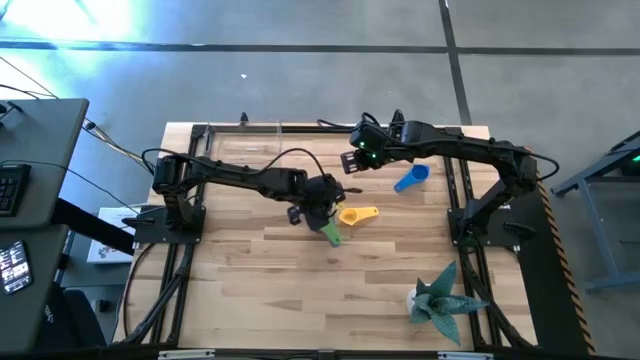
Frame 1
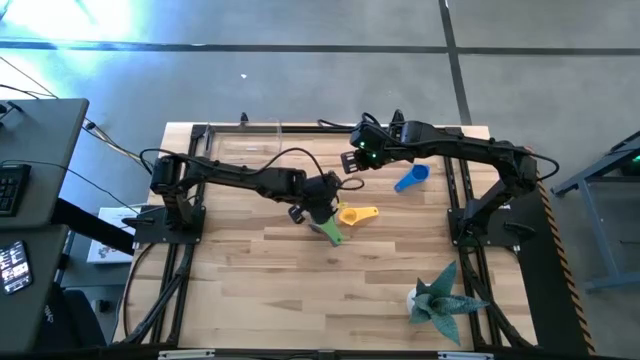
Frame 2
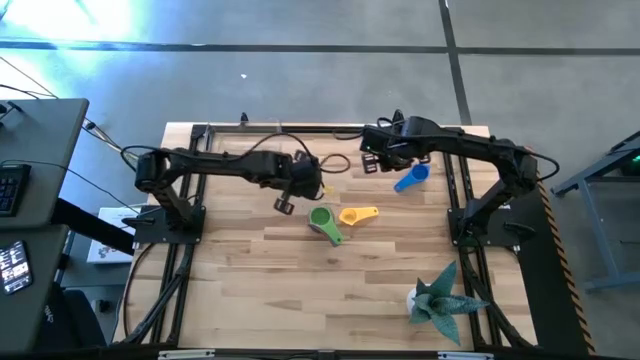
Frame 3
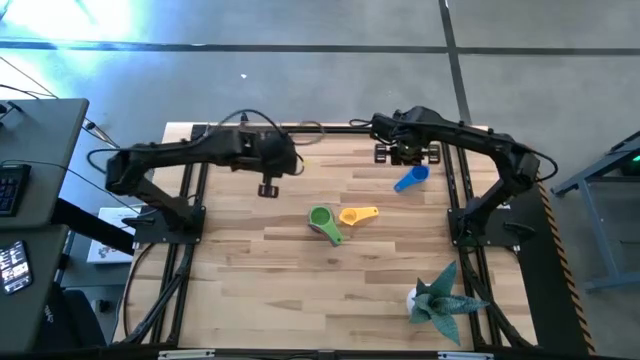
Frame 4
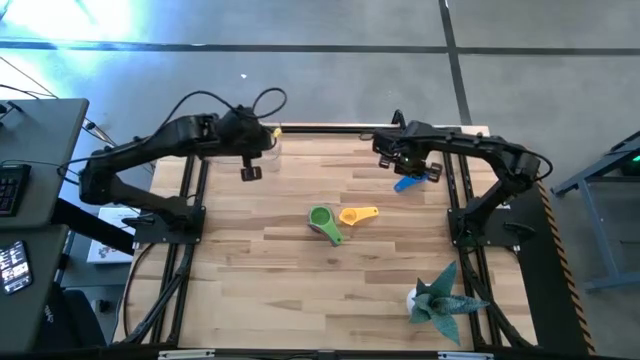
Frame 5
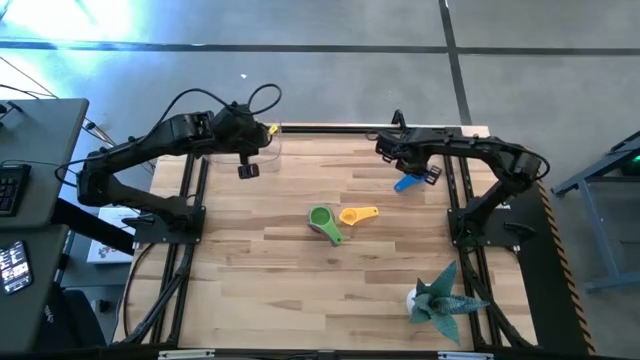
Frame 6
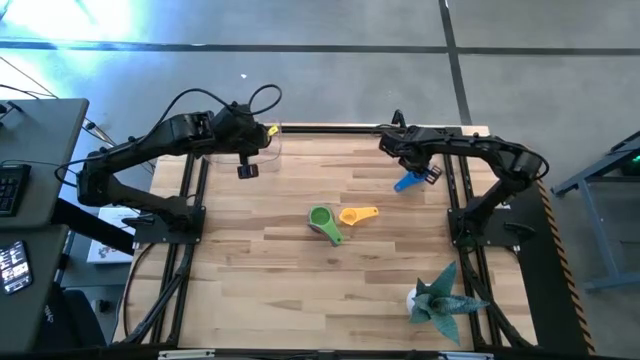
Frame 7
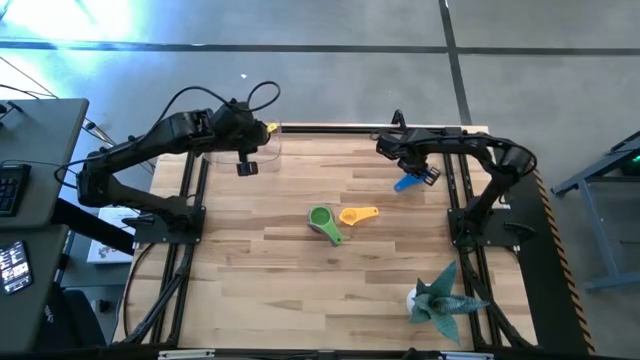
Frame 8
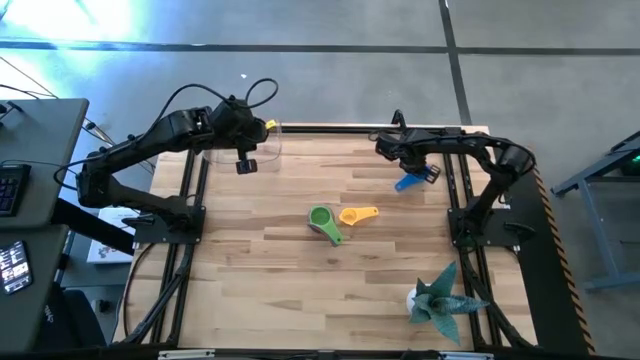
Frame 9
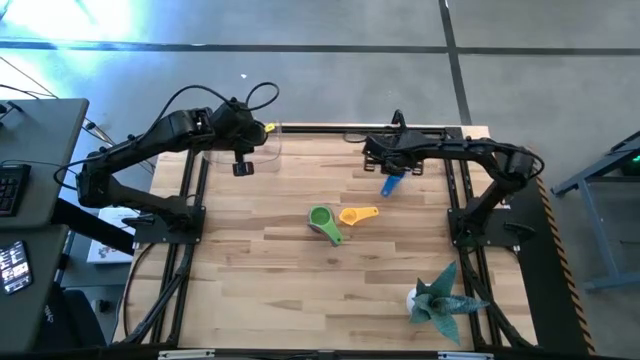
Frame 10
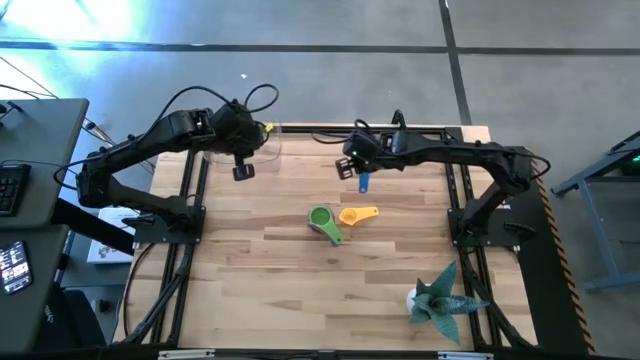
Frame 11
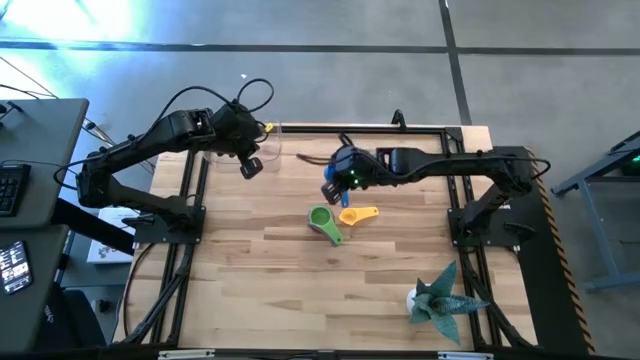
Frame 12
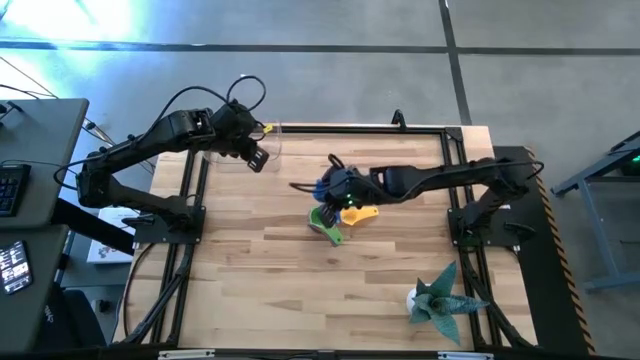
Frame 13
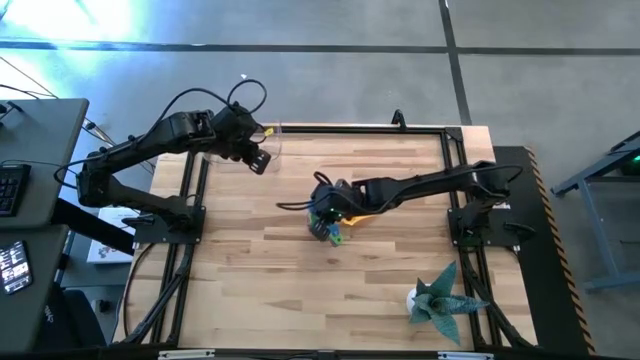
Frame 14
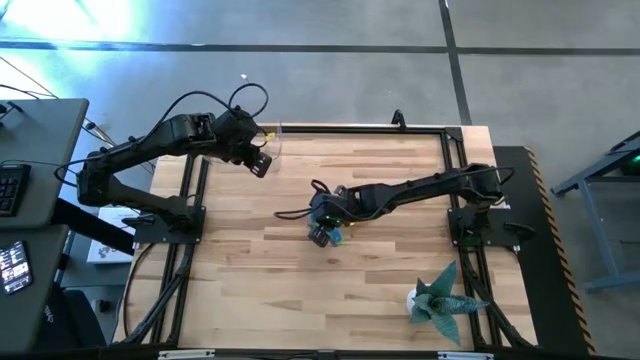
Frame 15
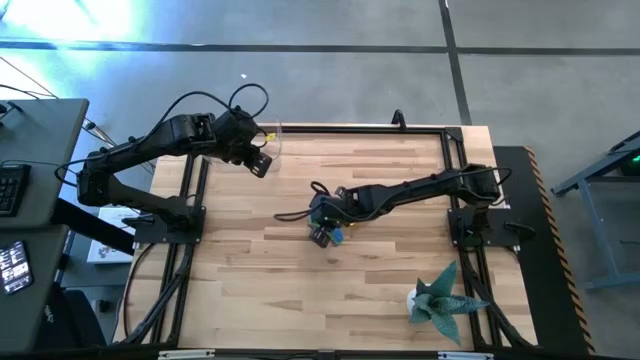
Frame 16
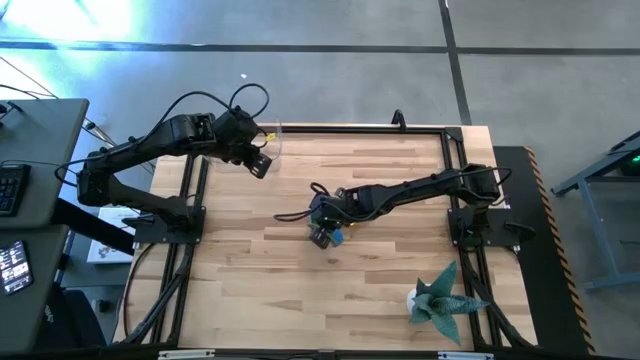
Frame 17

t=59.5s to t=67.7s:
Task: Nest measuring cups in basket
Stack the blue measuring cup on top of the green measuring cup

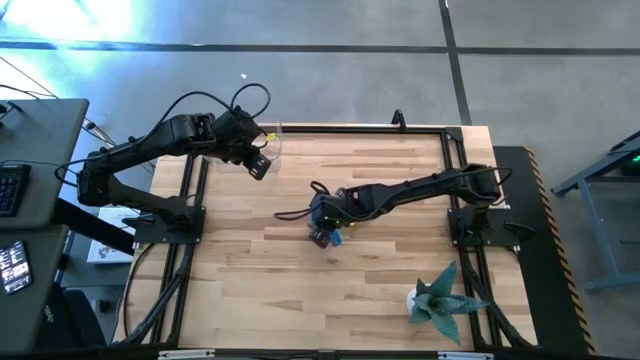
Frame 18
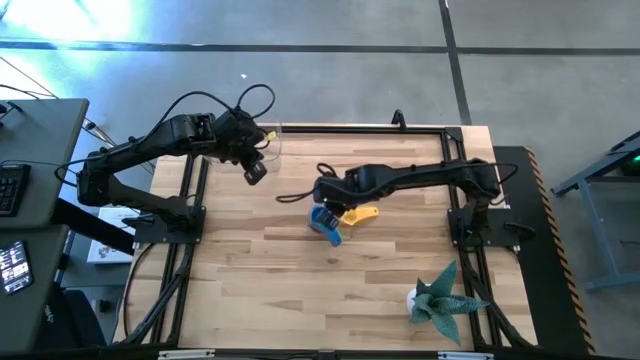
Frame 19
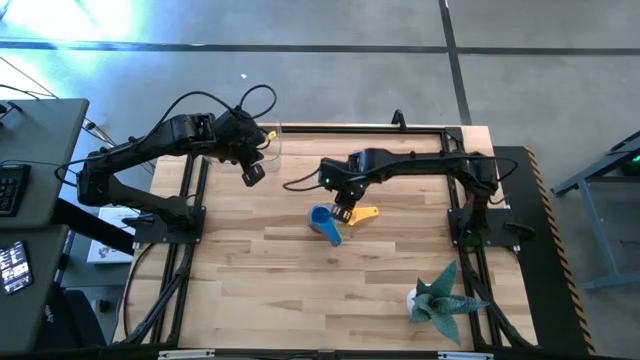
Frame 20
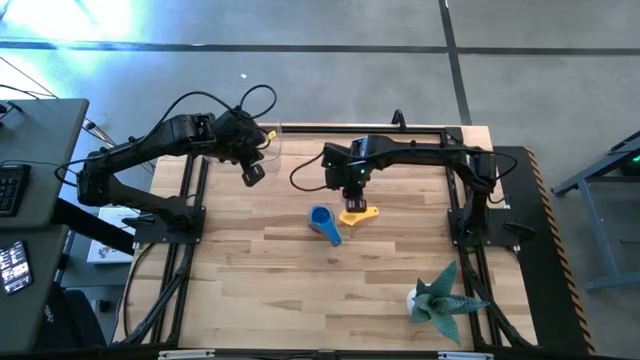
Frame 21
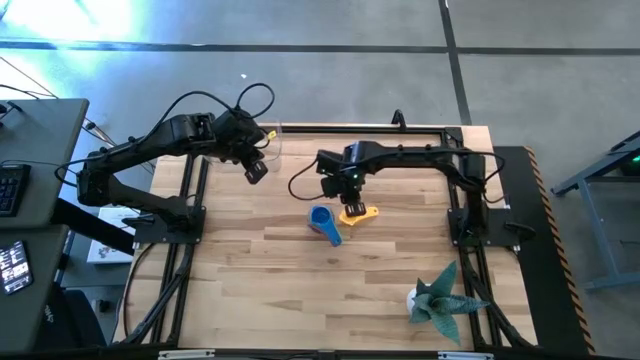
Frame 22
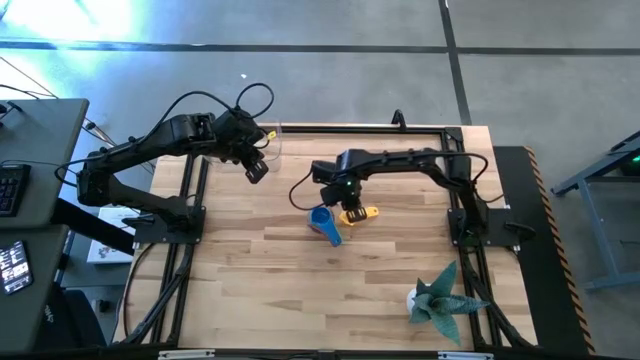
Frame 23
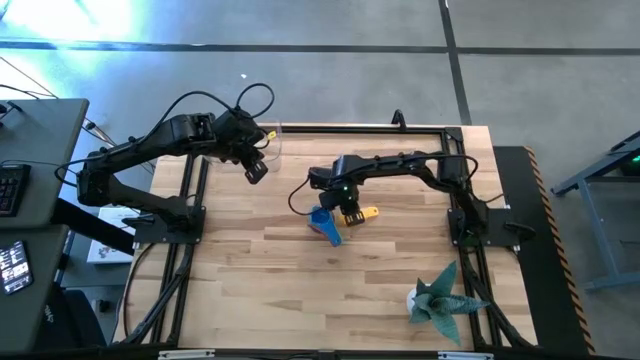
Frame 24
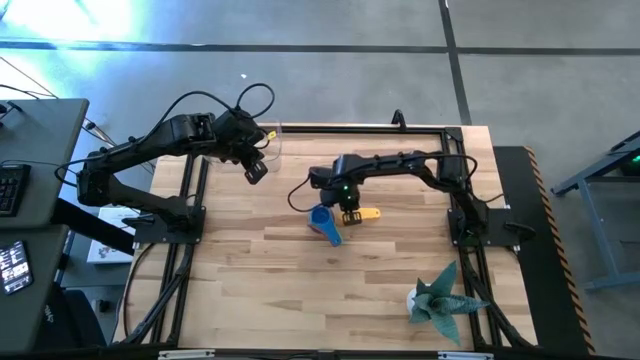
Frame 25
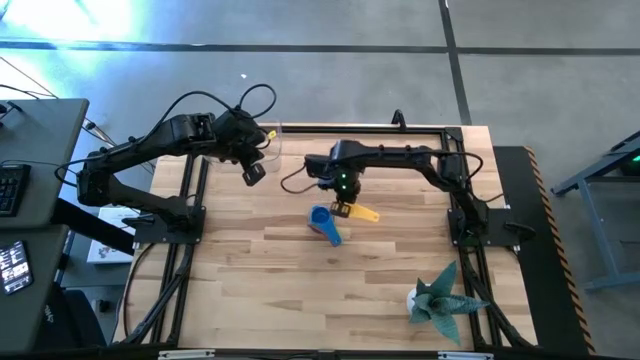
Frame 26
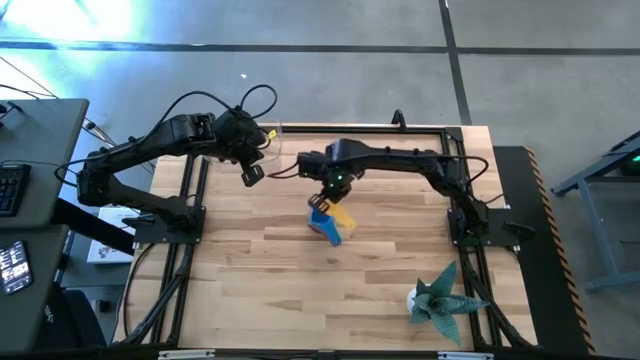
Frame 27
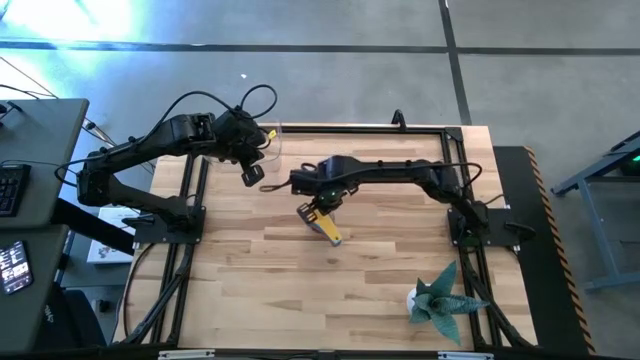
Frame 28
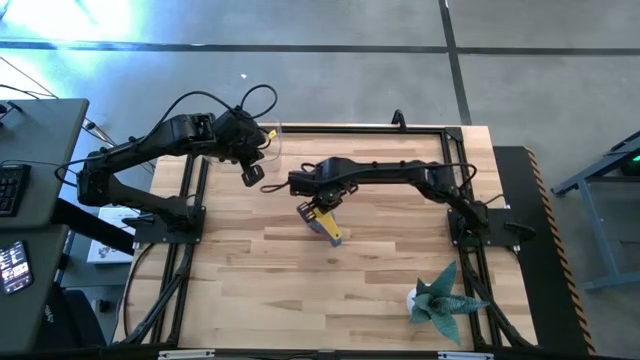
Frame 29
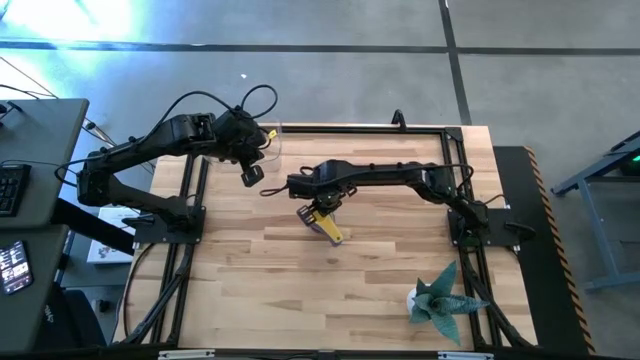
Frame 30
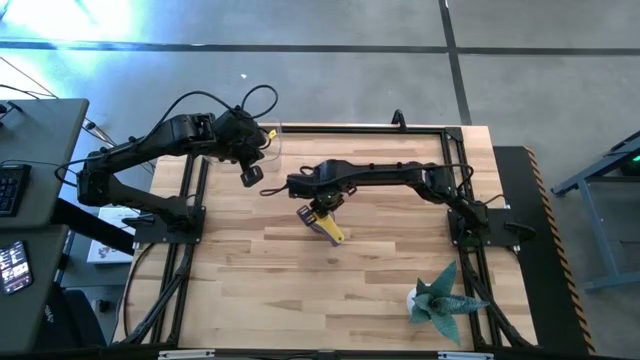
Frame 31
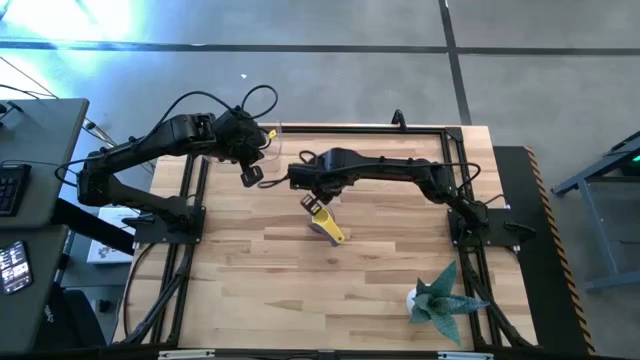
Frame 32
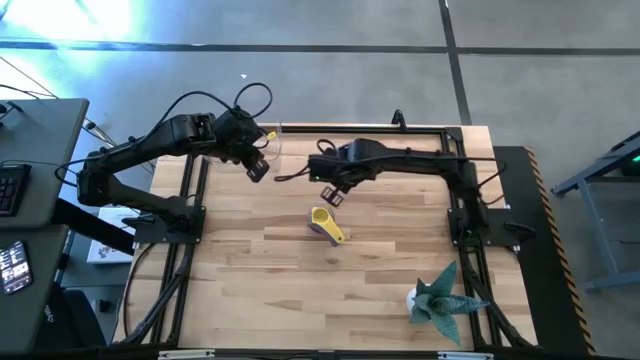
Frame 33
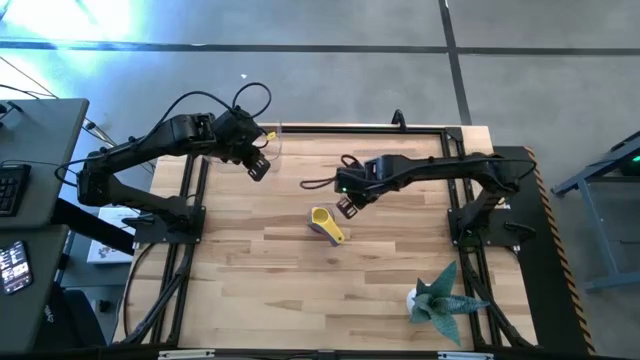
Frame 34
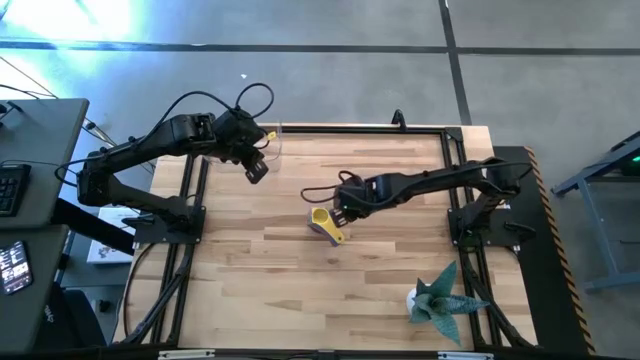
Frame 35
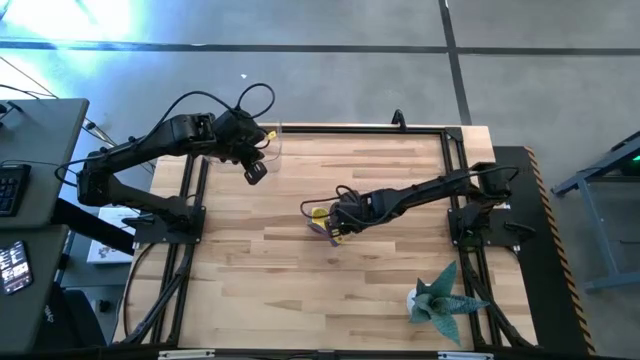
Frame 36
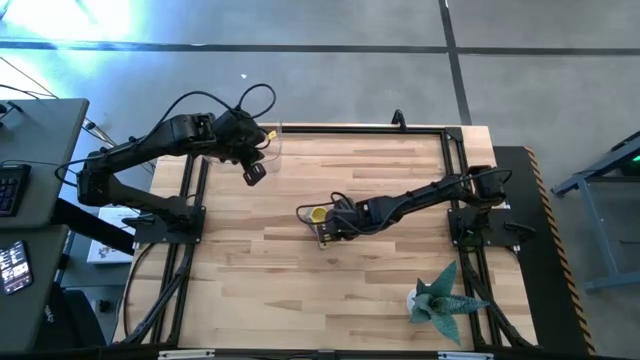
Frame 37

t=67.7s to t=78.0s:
Stack the yellow measuring cup on top of the blue measuring cup

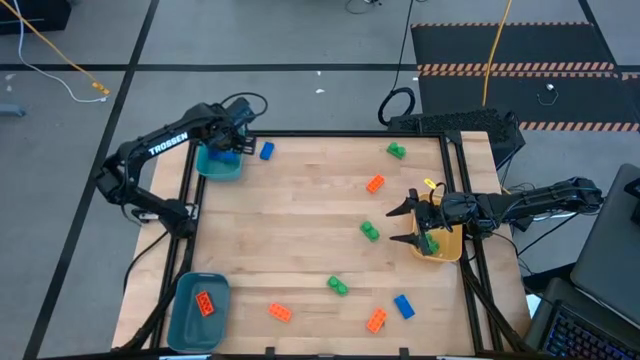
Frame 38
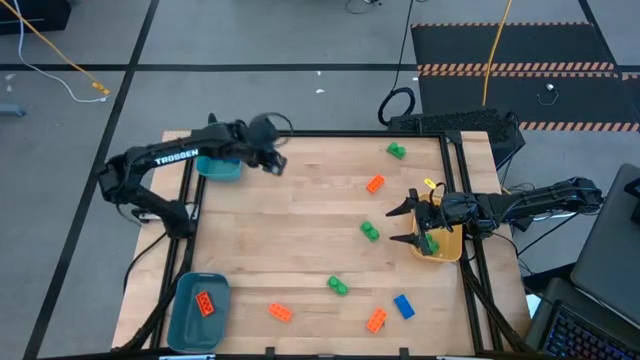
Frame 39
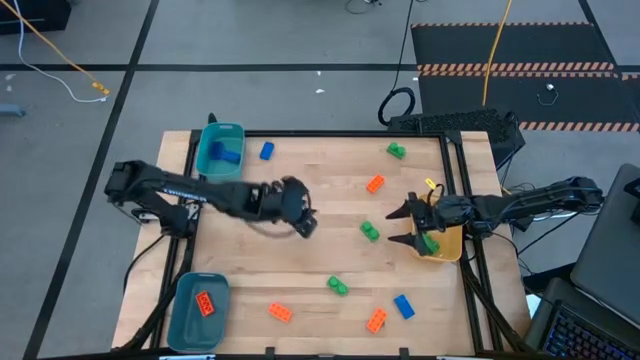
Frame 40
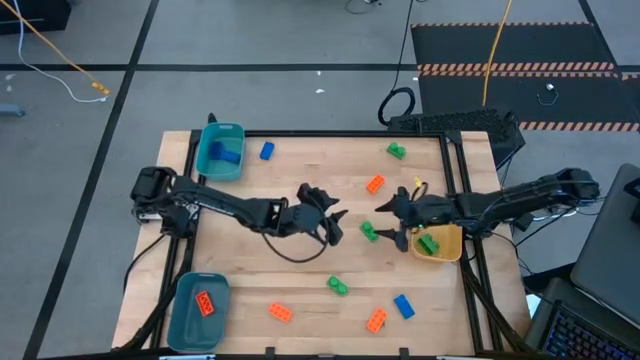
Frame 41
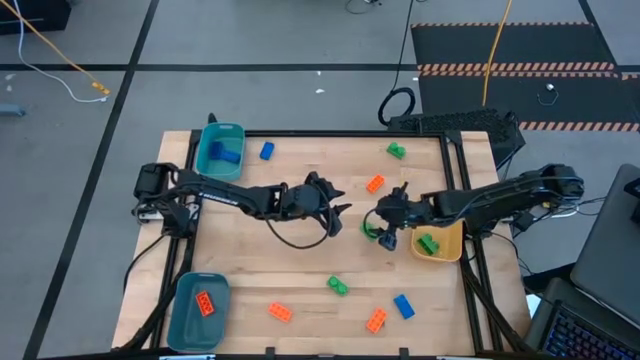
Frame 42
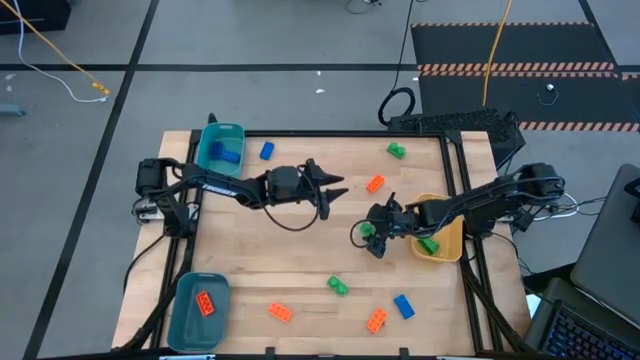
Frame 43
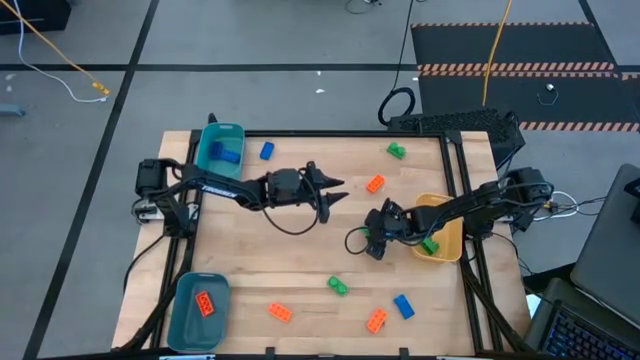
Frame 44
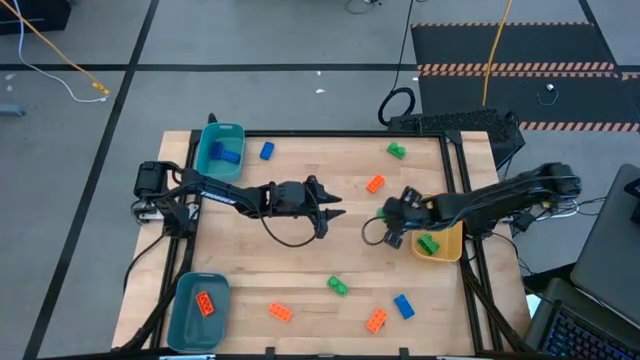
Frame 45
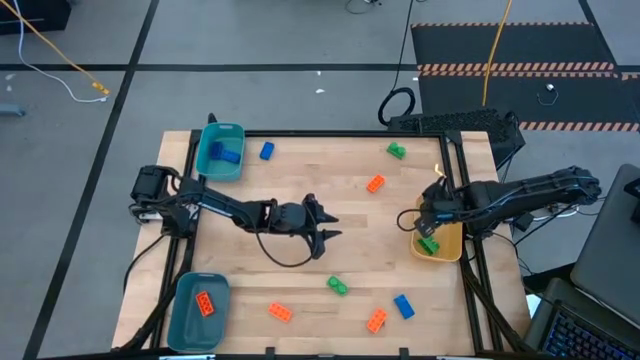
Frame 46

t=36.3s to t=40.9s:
Task: Sort & place blocks by color
Put the green game piece into the yellow bin
